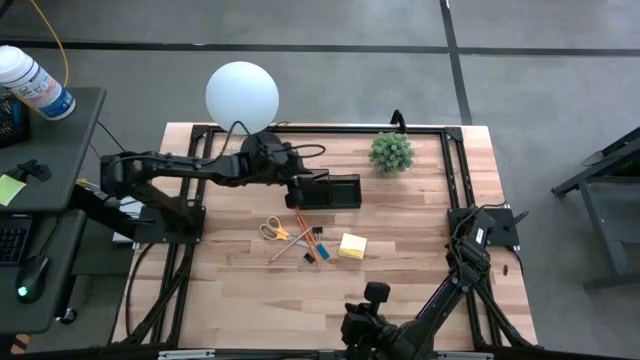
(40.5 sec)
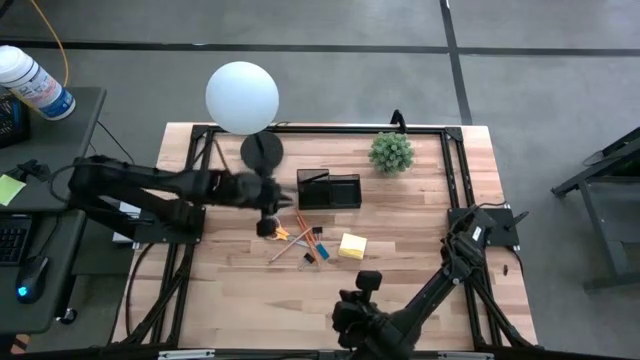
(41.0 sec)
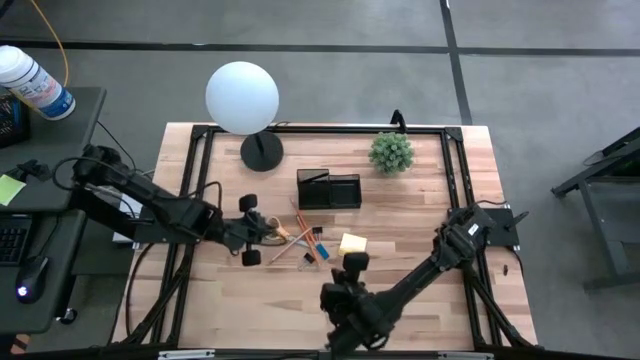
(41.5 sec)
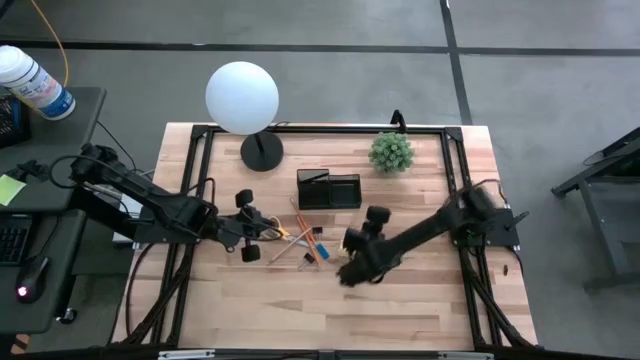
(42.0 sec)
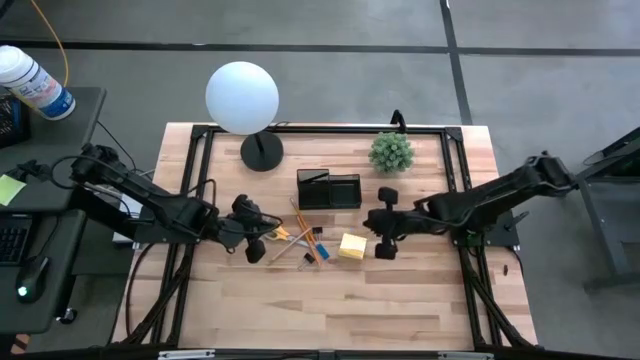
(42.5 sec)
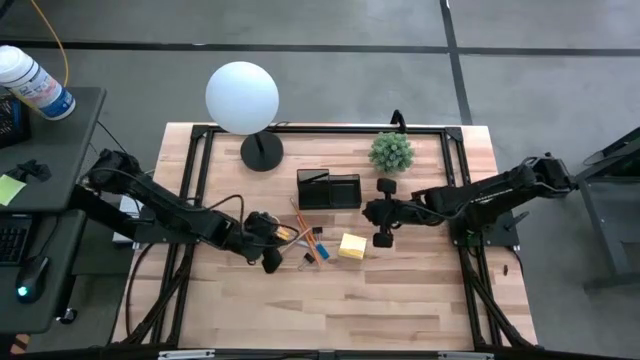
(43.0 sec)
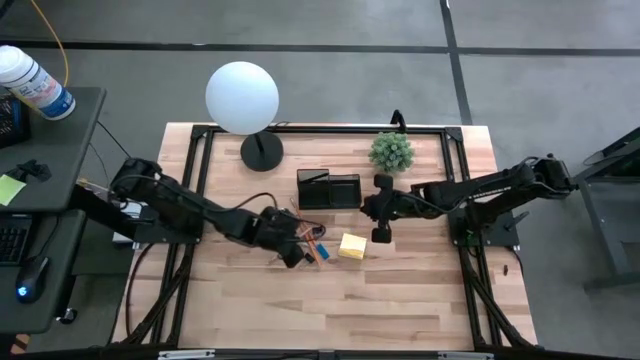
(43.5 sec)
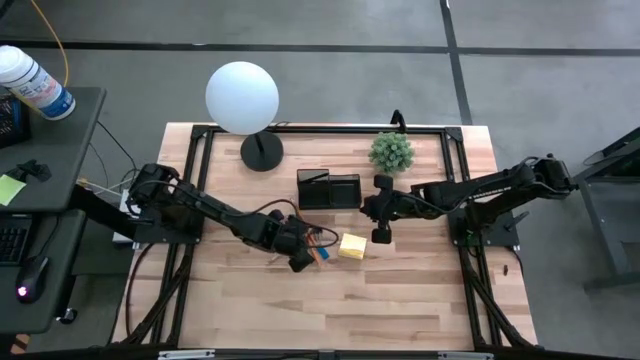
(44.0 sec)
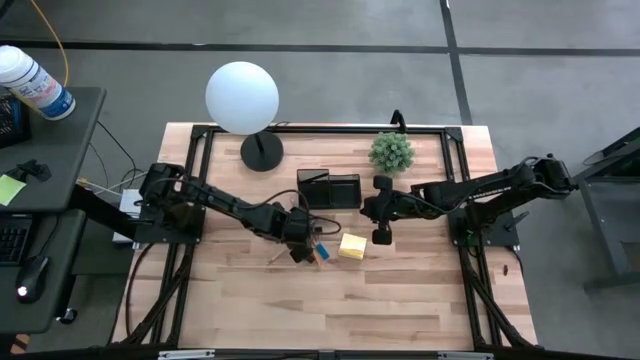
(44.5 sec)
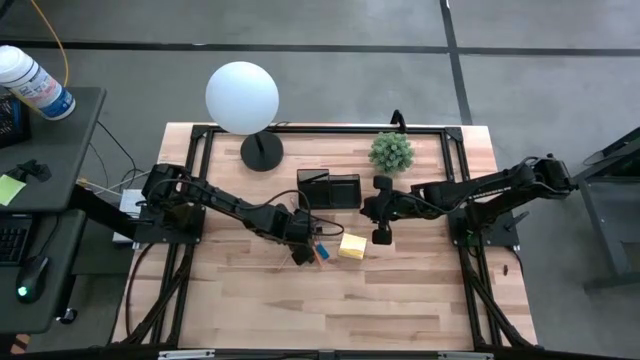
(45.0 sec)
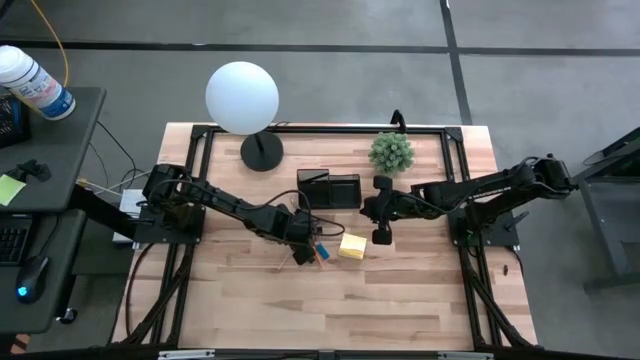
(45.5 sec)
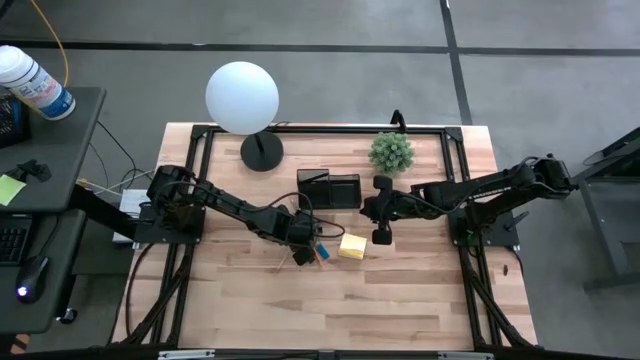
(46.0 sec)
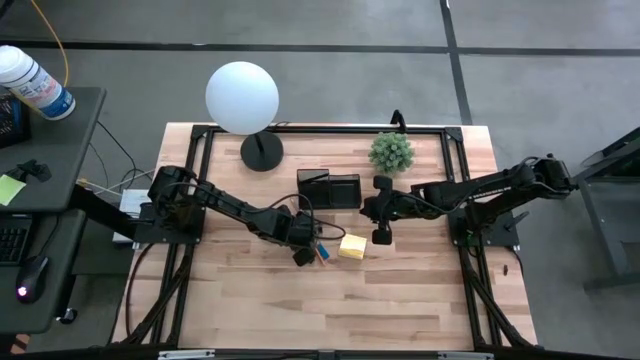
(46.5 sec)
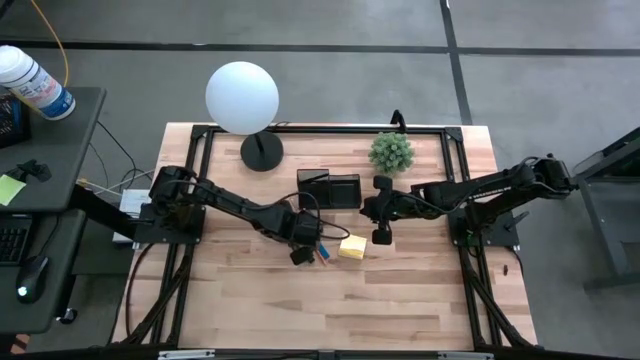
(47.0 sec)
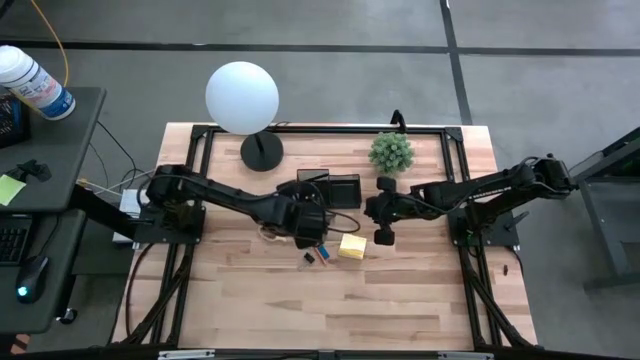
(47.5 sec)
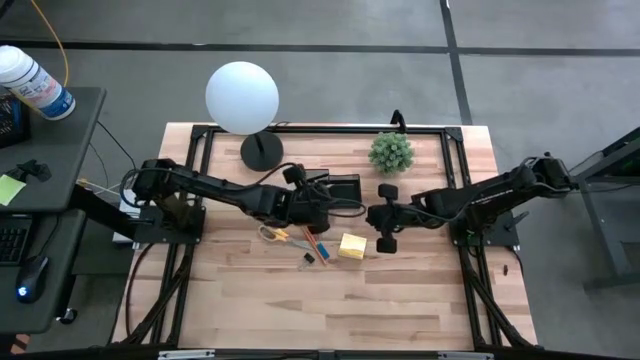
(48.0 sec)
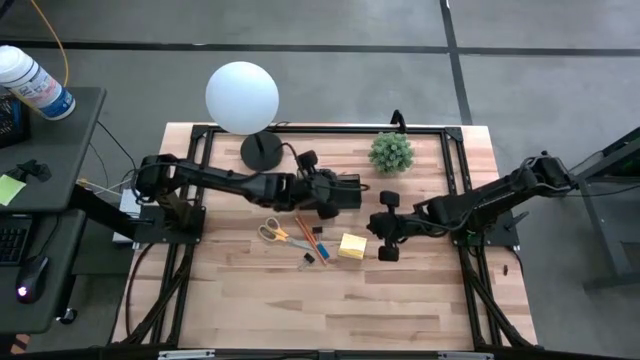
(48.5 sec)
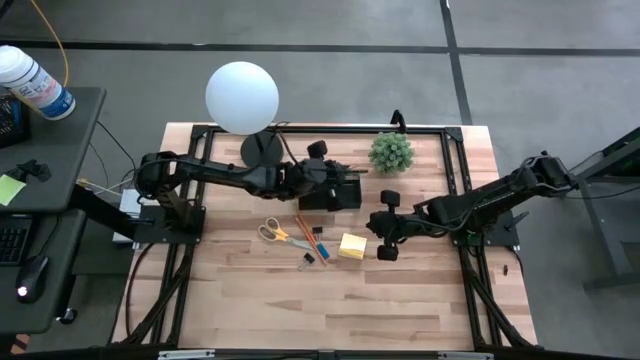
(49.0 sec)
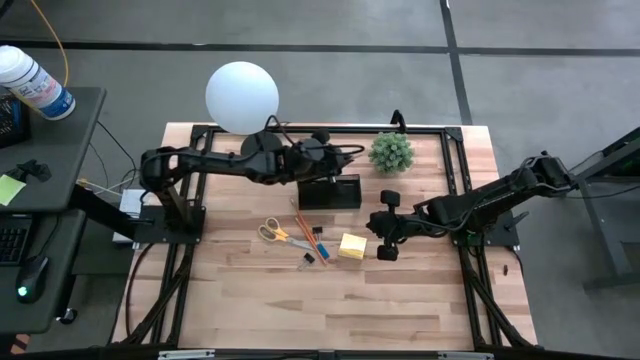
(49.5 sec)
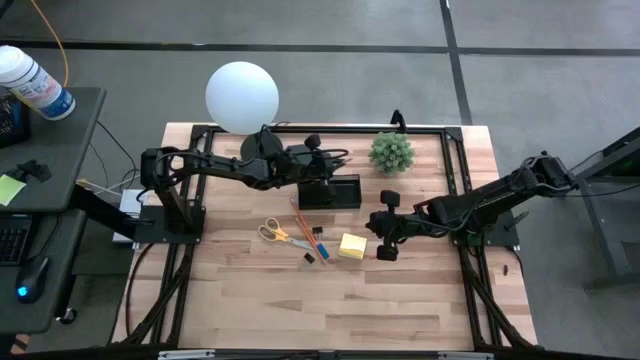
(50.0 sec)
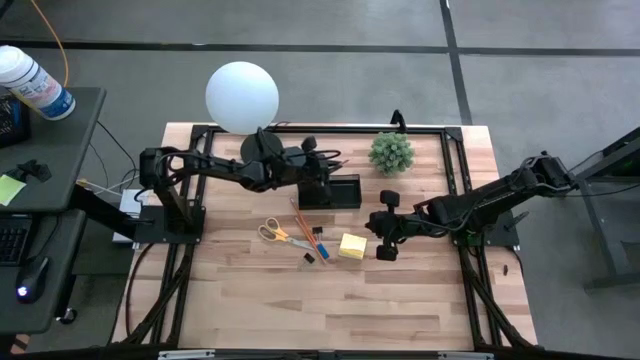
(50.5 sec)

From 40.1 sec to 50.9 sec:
Task: Pick and place office supplies into organizer
Put the pink pencil into the black organizer

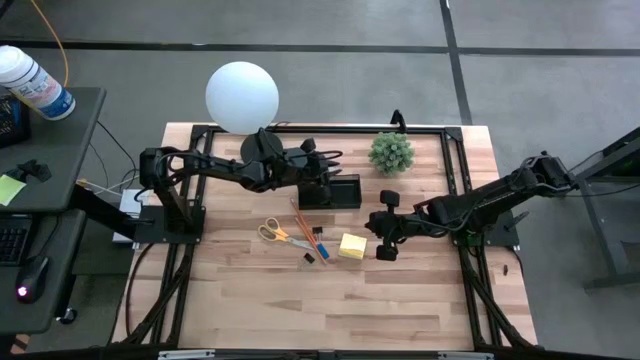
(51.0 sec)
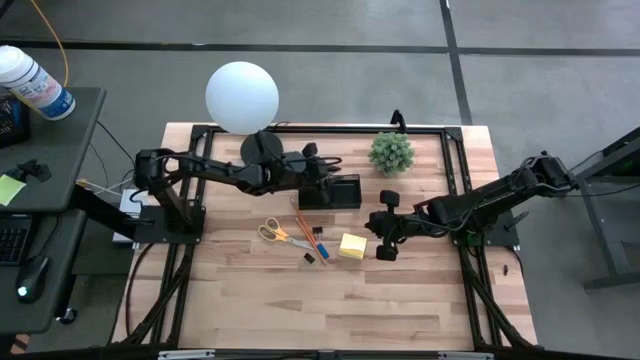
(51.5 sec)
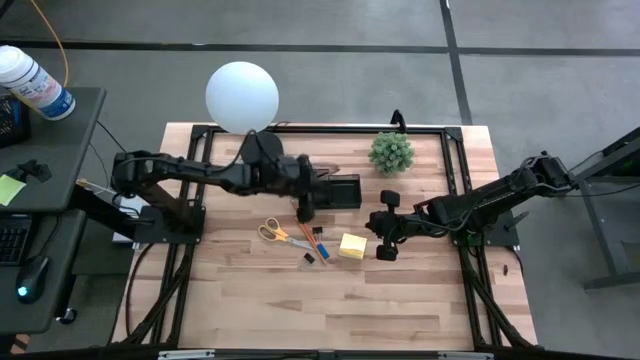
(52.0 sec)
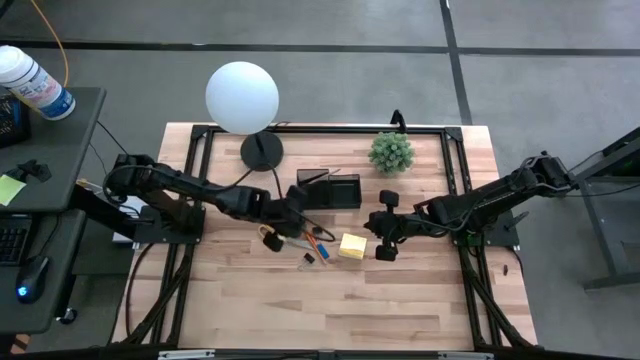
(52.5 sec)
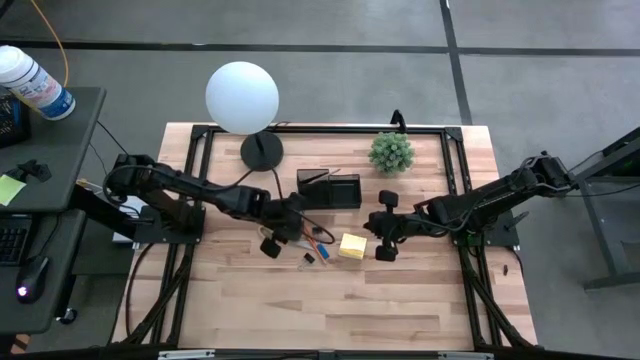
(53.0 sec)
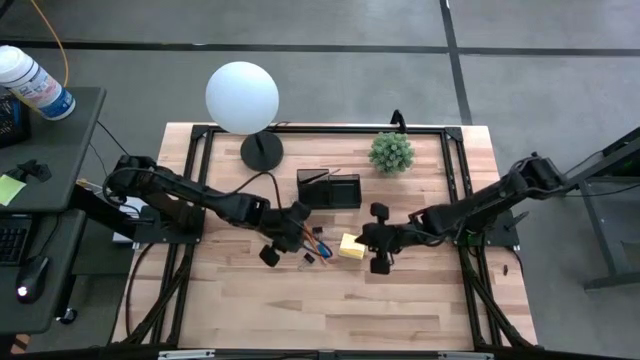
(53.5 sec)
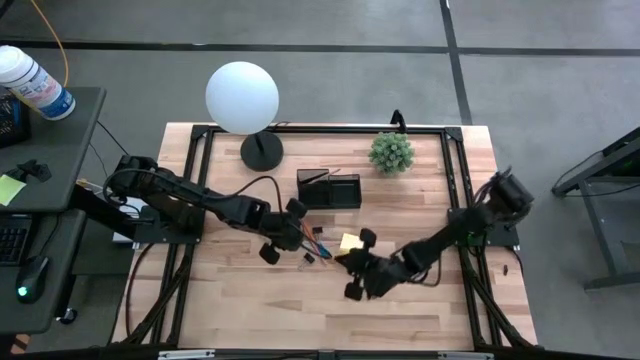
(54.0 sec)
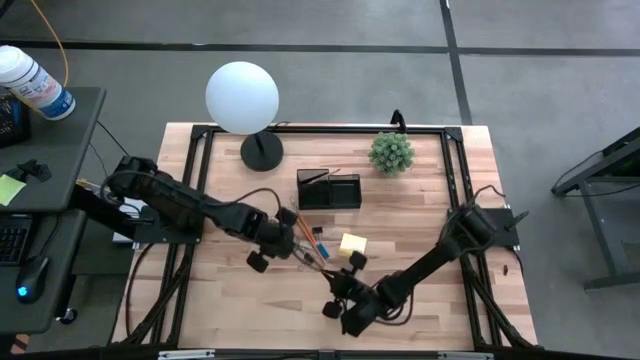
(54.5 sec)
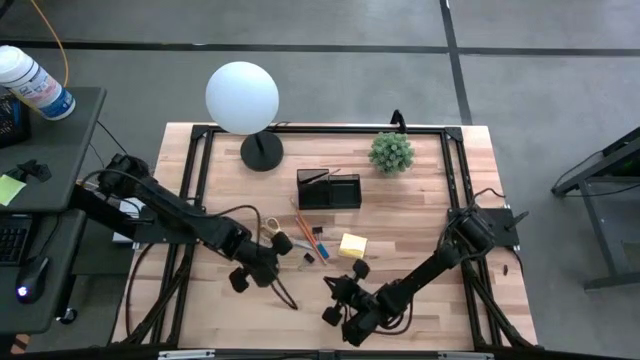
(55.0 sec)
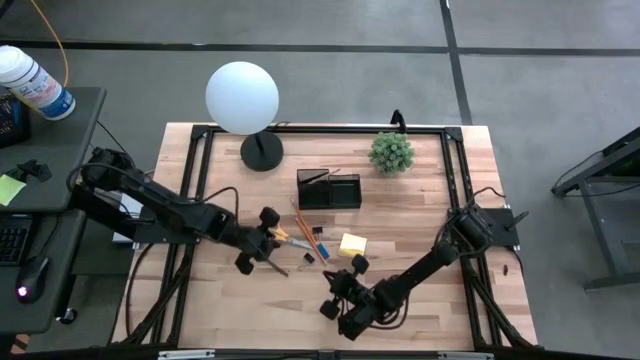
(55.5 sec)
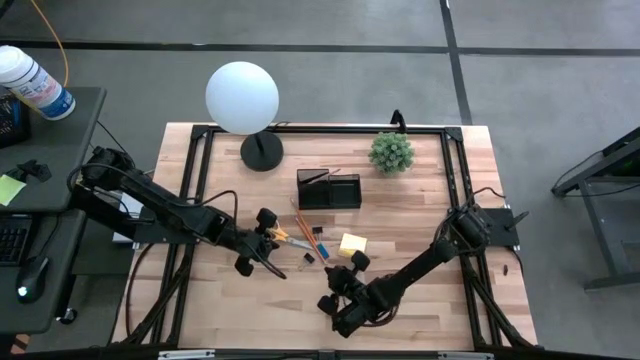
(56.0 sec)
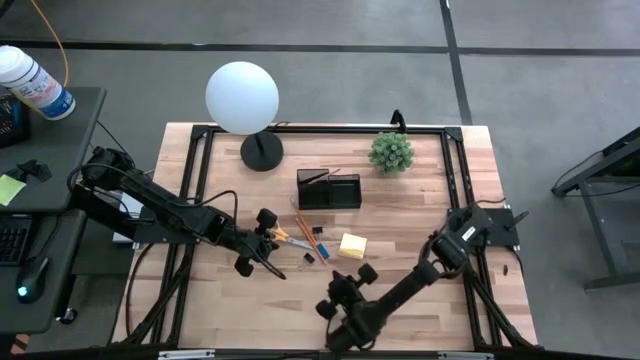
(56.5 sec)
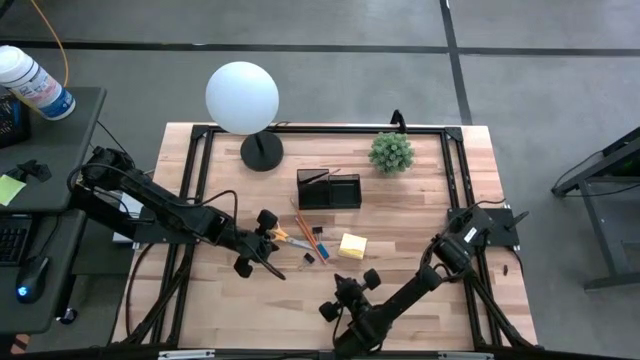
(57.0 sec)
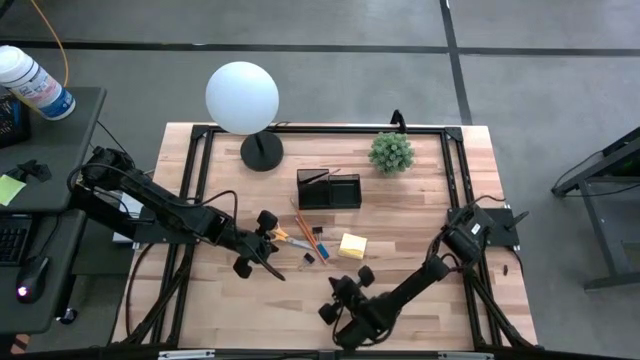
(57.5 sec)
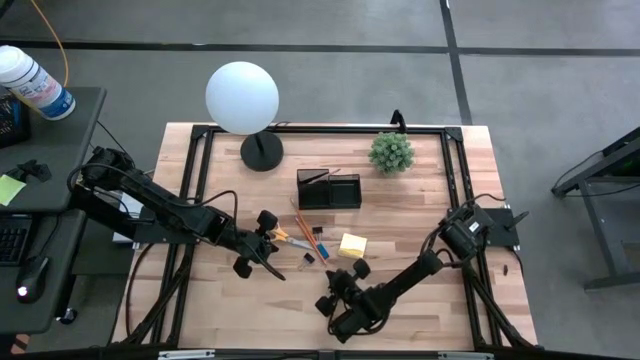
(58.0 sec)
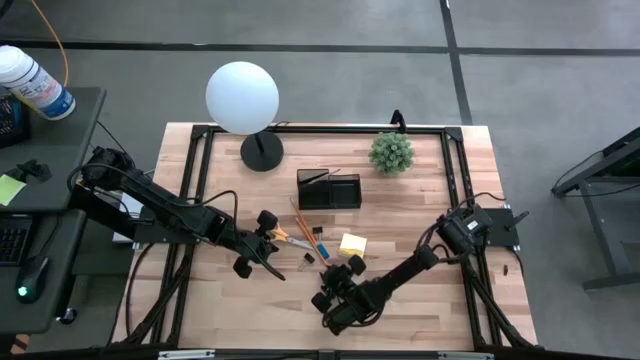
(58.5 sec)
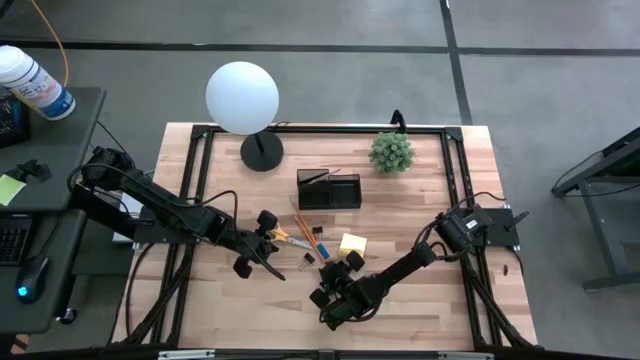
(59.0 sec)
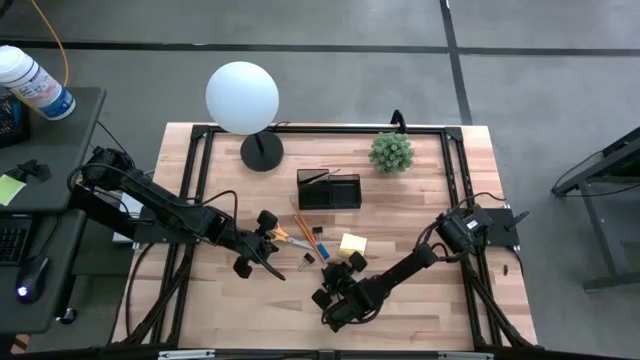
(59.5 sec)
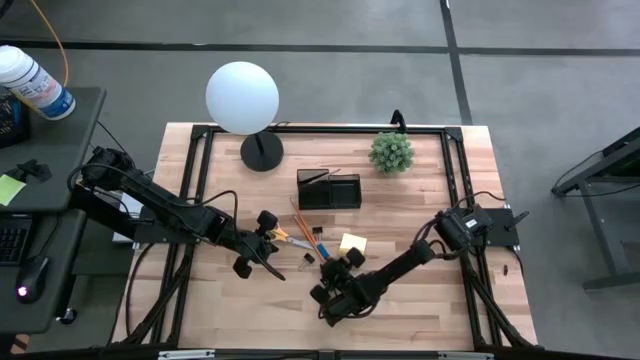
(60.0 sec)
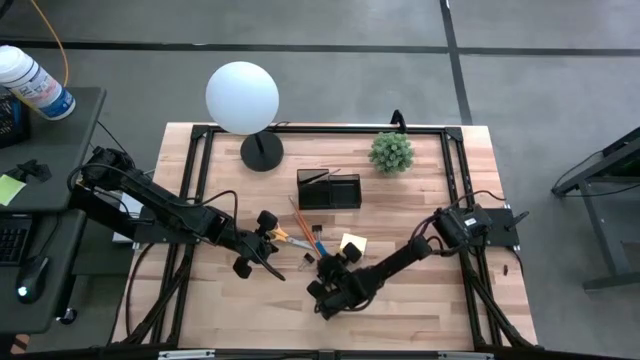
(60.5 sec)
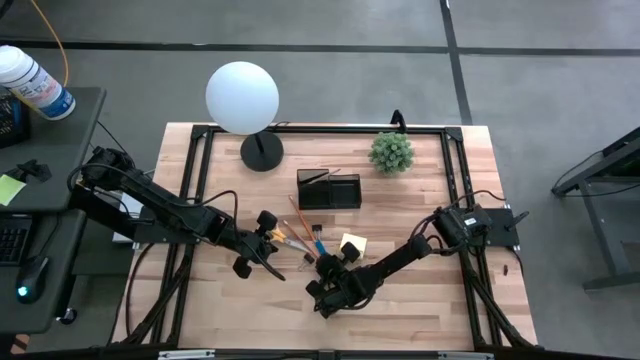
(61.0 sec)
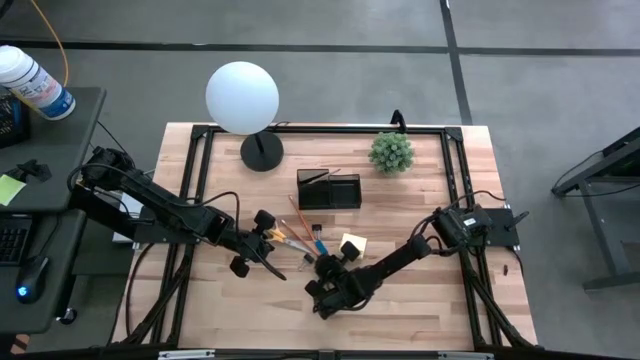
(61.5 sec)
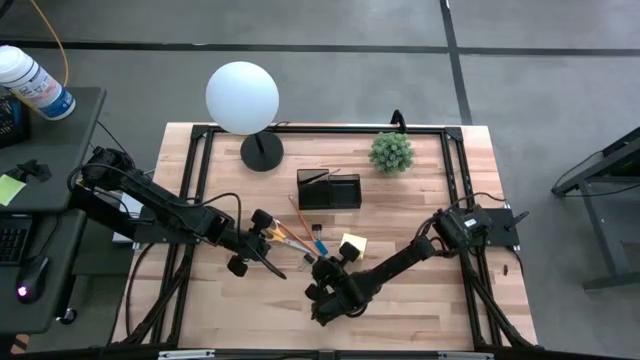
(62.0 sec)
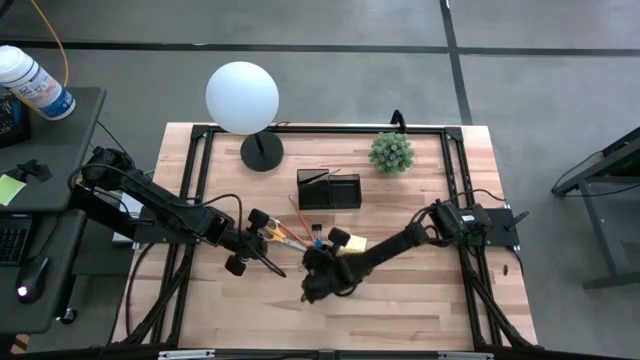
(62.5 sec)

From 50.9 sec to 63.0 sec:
Put the bottom yellow pencil into the black organizer
